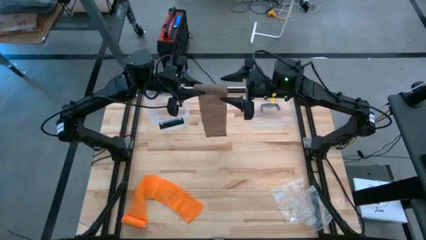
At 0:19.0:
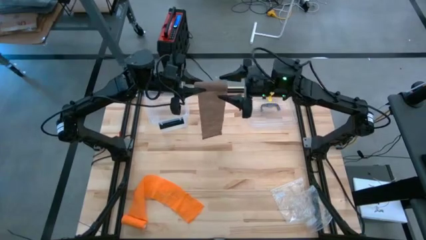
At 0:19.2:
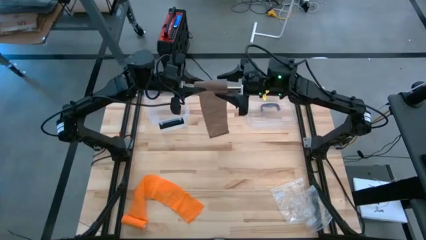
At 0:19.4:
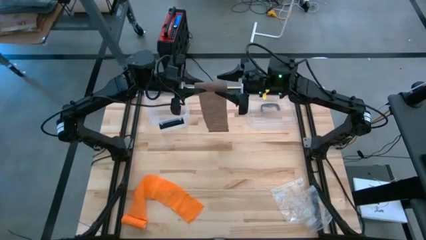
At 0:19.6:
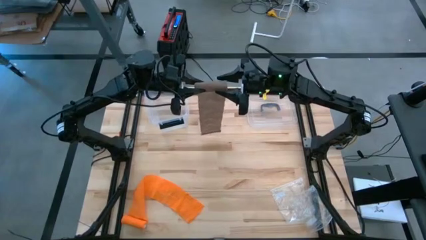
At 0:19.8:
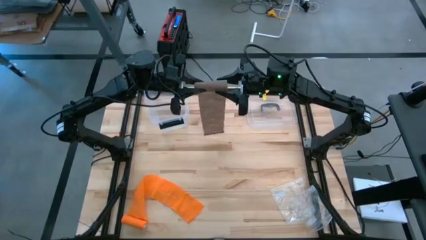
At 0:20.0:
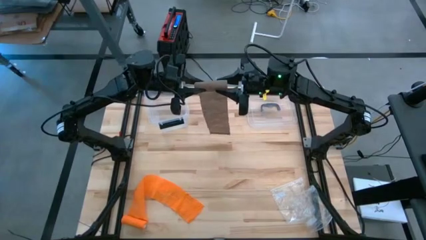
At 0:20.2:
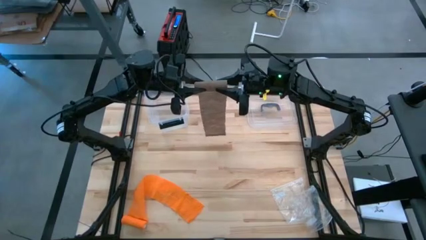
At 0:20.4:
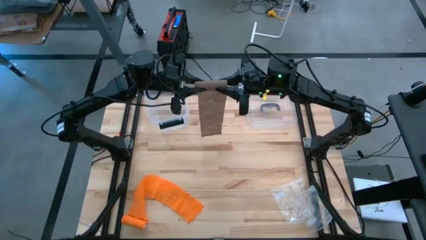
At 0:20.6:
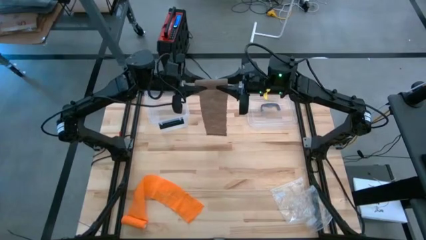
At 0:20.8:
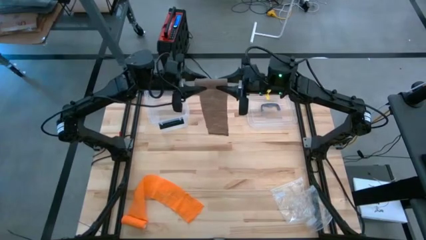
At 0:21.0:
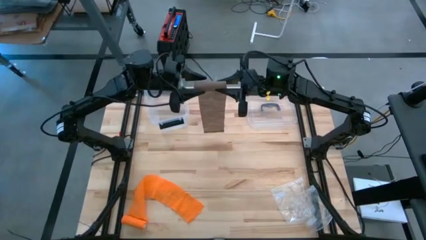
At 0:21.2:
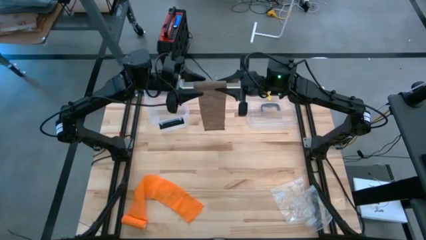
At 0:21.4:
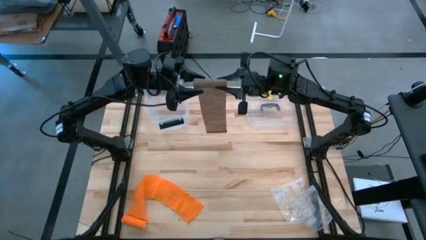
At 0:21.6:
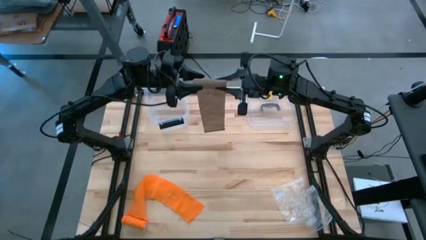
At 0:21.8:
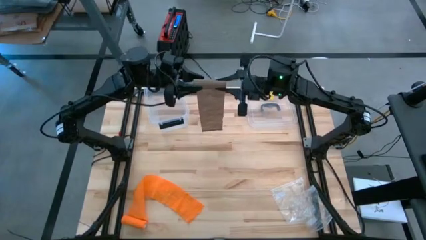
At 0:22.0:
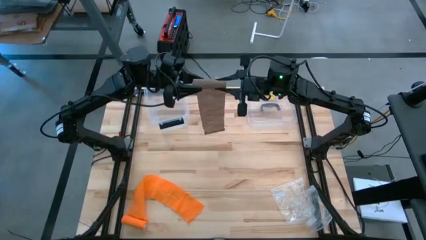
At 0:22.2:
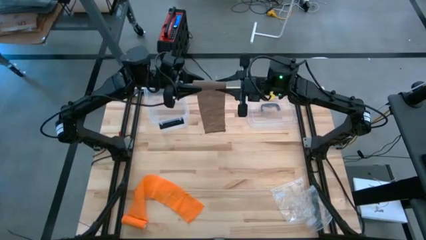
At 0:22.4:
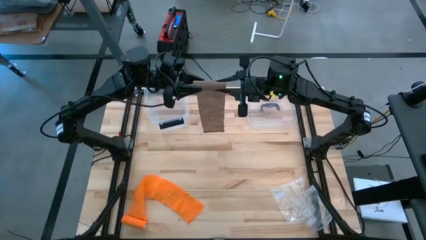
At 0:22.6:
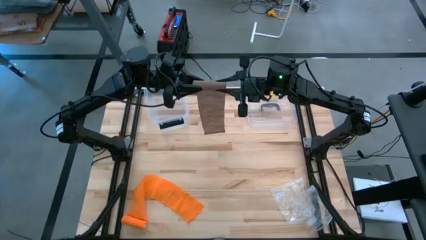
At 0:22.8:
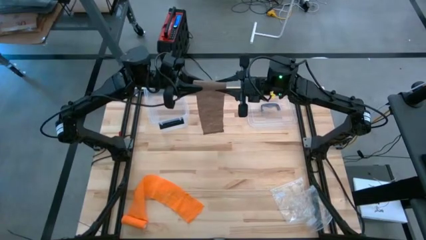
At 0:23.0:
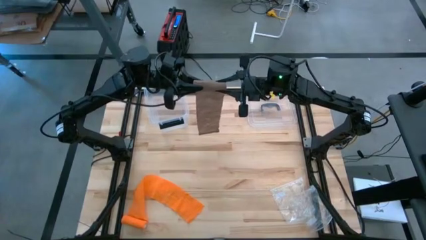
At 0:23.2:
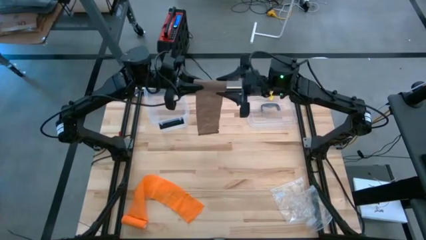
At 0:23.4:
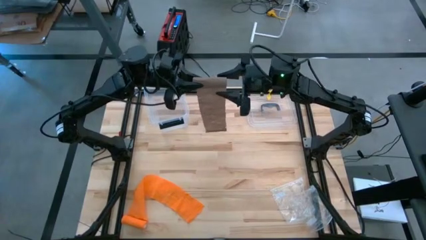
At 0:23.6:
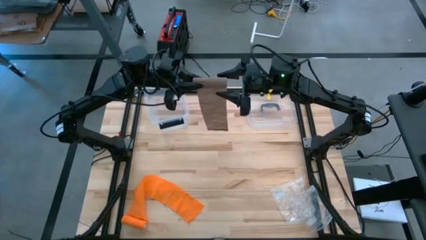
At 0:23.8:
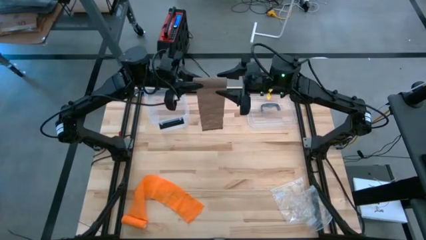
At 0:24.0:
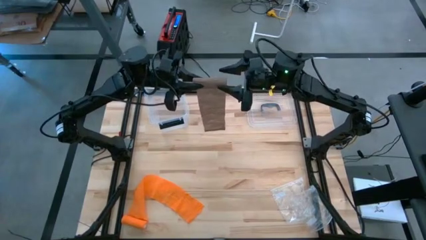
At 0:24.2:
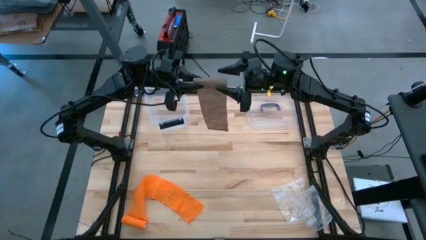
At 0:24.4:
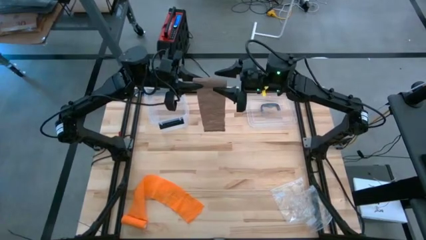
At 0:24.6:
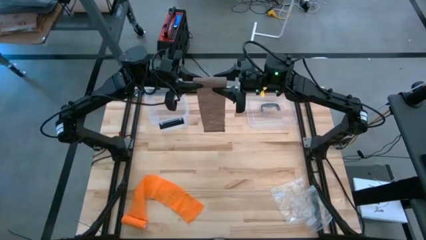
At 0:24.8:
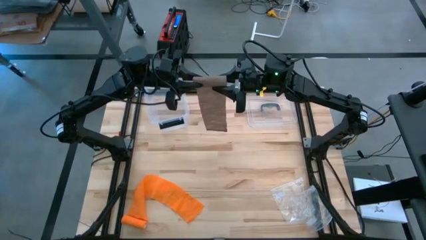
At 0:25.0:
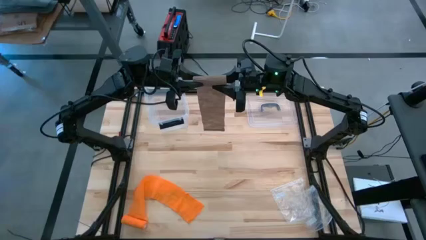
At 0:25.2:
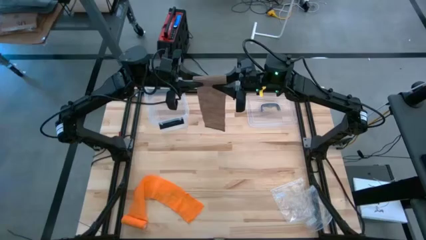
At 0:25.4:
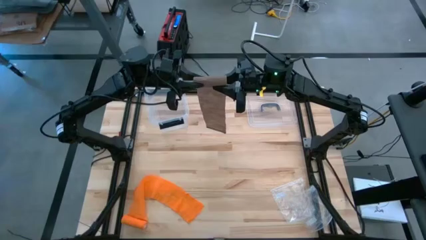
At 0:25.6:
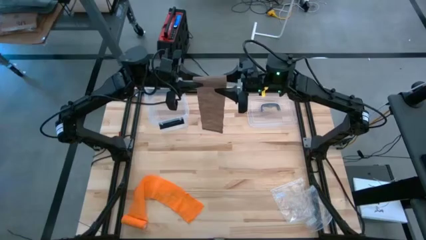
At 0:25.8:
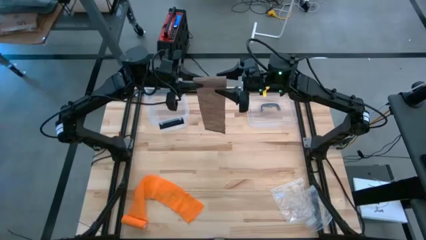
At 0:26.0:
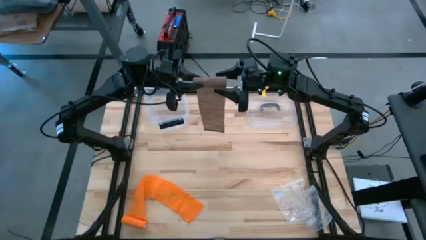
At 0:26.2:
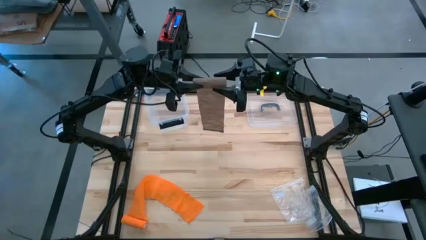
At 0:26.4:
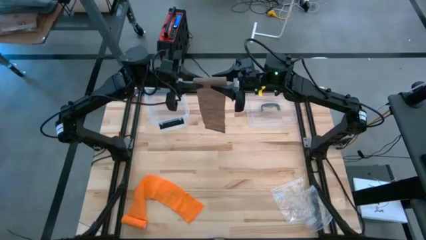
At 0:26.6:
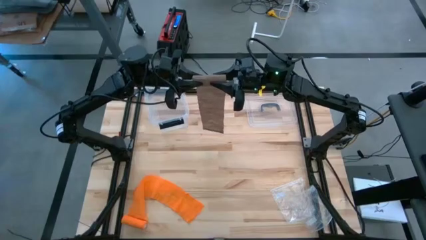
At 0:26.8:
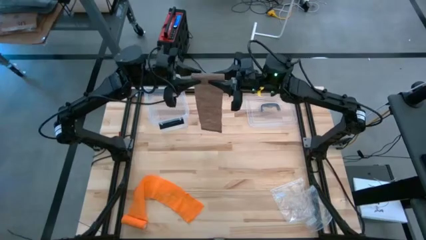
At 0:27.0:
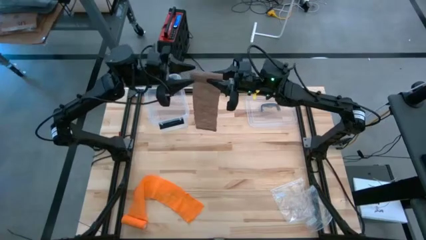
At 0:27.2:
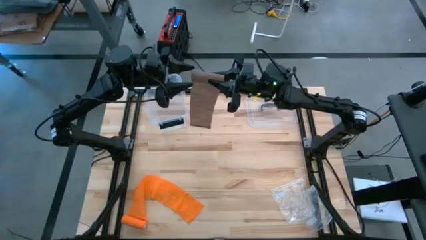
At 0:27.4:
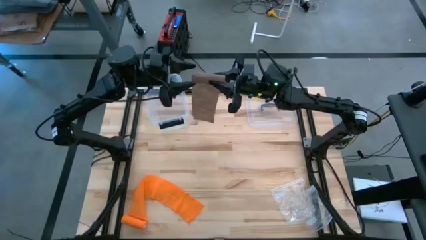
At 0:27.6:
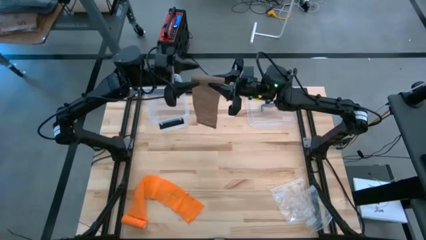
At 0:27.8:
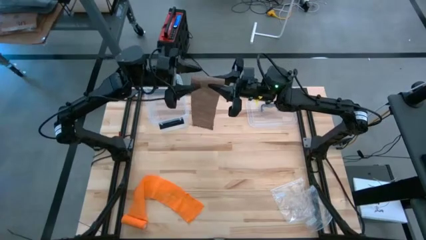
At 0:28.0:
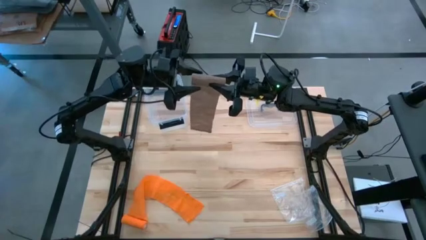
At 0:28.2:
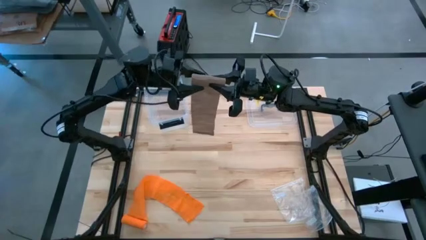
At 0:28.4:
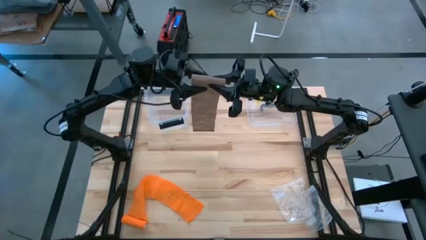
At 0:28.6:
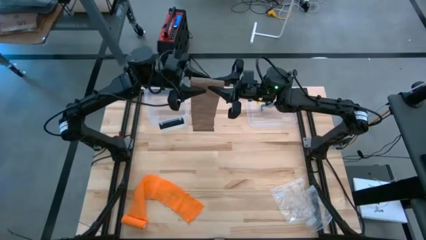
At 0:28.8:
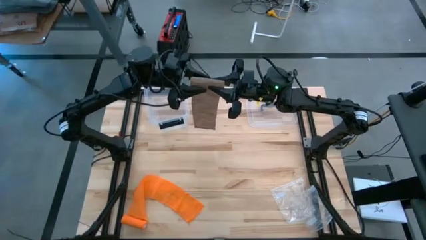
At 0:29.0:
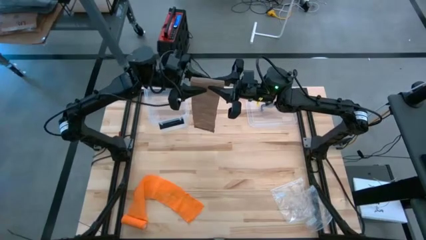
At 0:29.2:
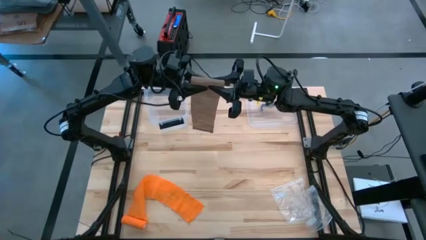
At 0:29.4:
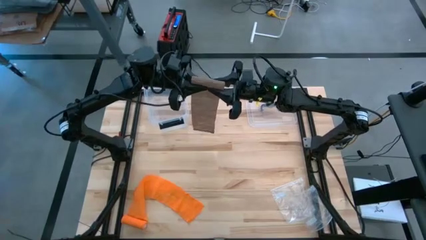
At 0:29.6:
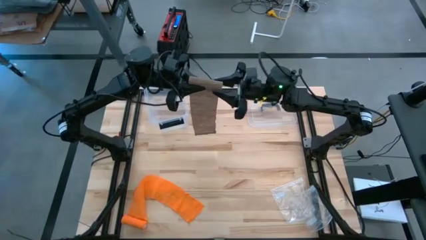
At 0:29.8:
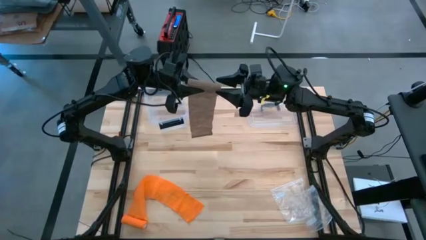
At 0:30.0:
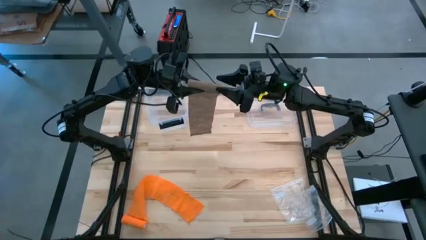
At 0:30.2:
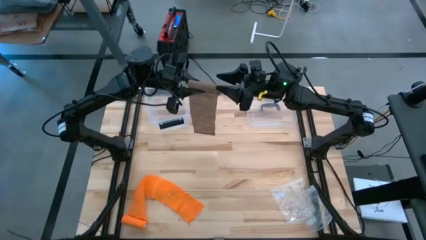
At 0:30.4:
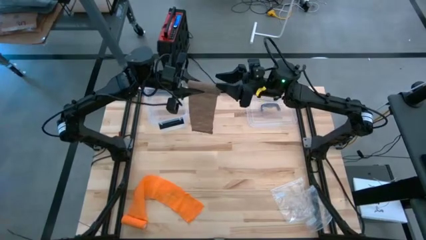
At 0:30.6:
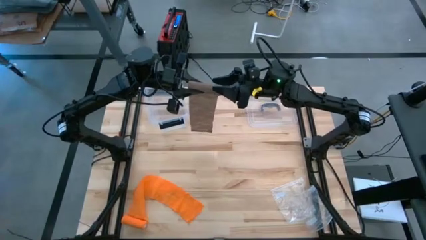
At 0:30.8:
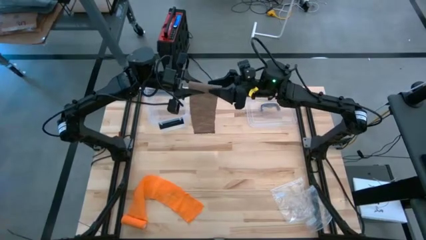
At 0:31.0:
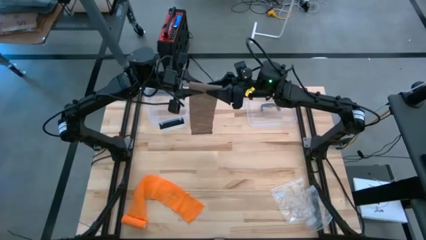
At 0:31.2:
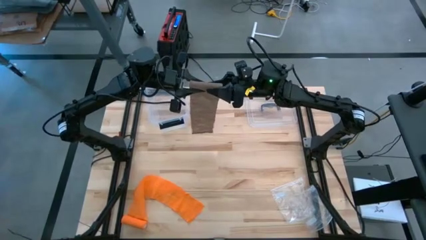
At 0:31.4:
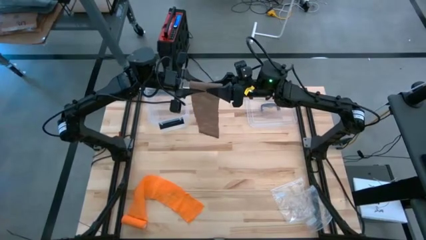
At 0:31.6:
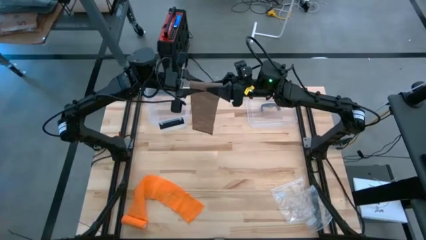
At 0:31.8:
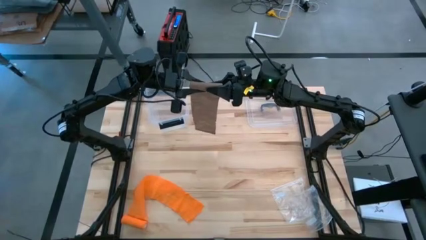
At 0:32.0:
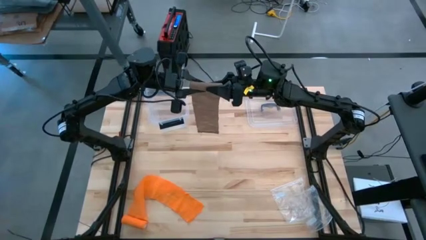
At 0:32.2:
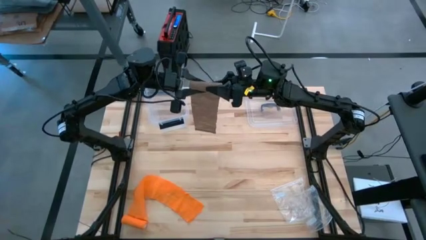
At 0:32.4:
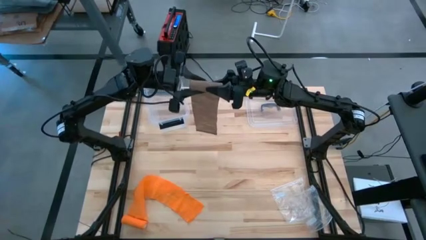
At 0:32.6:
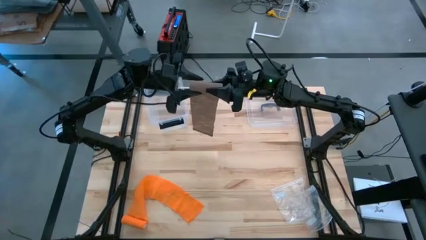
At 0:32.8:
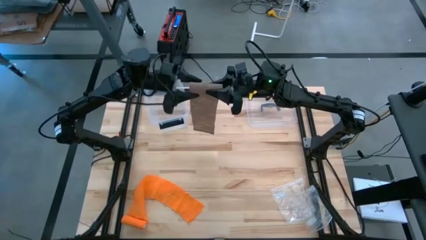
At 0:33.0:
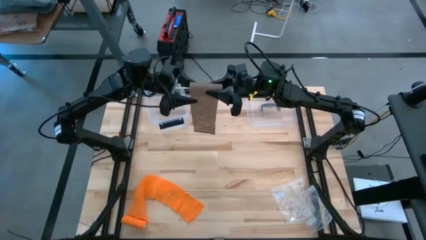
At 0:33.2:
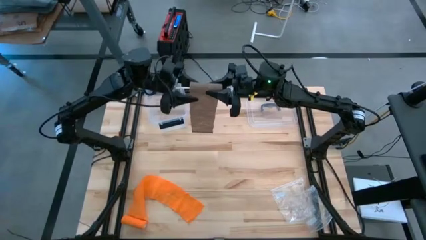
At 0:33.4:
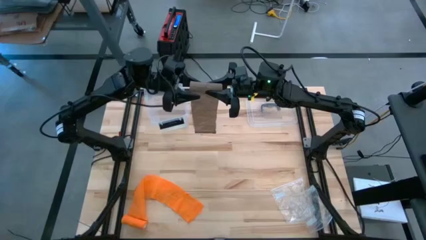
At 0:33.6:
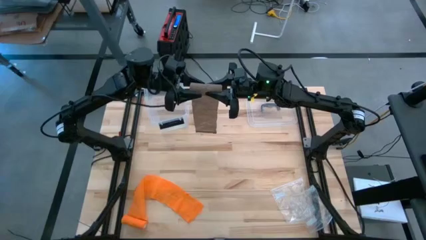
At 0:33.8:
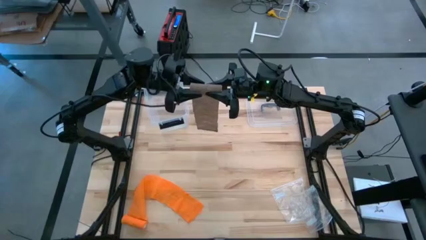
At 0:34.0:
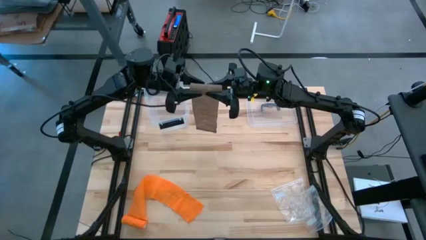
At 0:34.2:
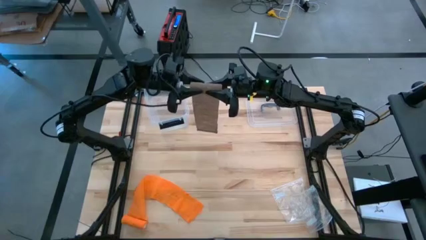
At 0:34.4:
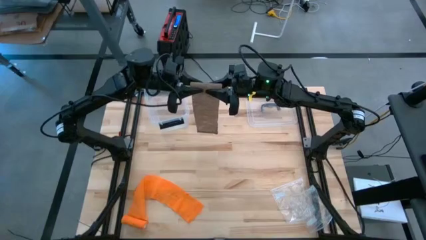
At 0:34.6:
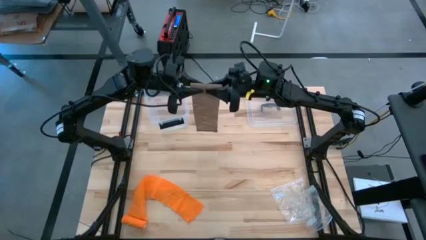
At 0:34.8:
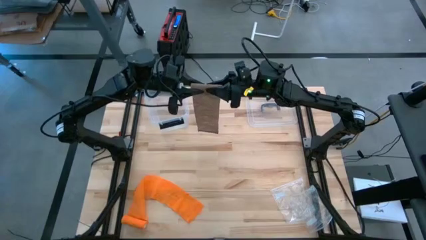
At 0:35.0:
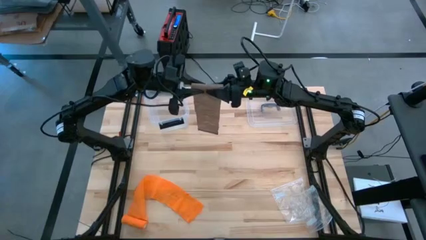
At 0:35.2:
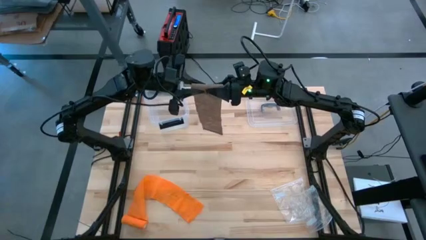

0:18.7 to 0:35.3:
Task: Roll bandage
Roll the brown bandage
